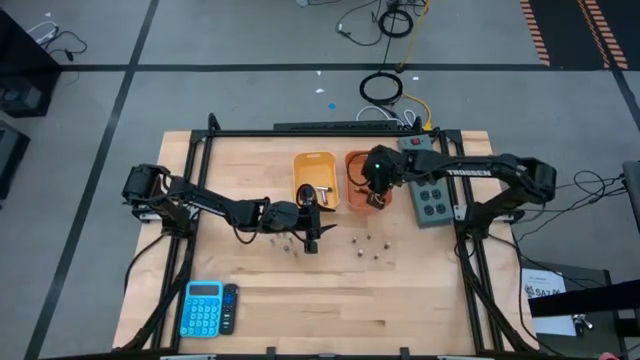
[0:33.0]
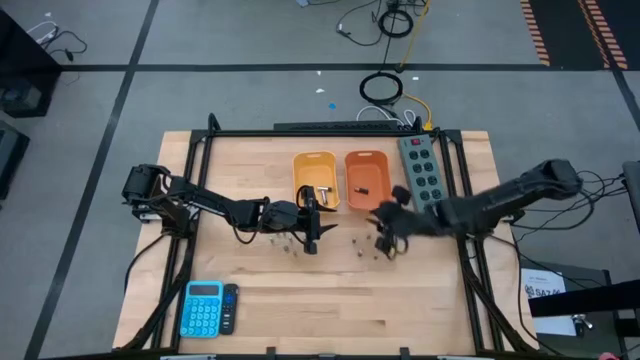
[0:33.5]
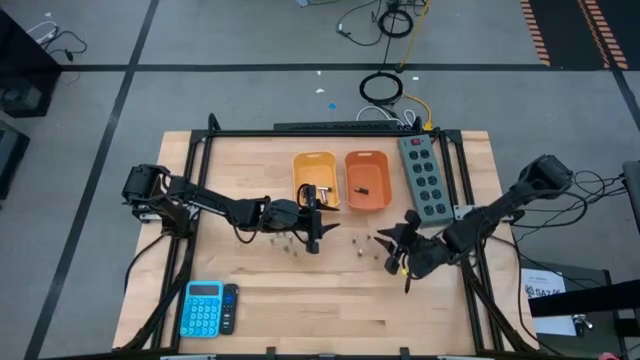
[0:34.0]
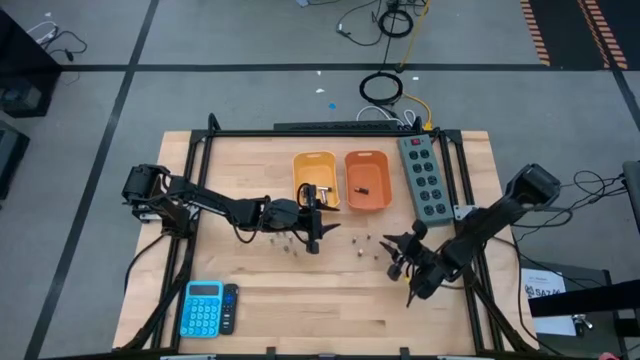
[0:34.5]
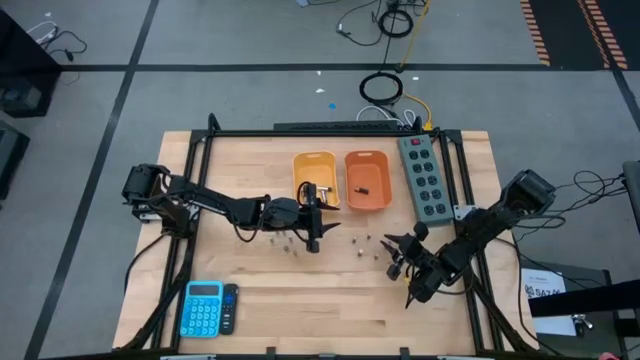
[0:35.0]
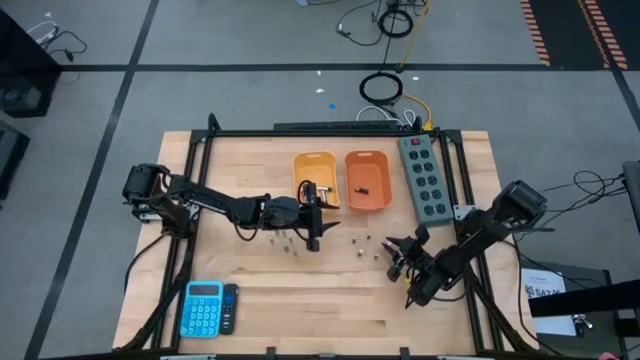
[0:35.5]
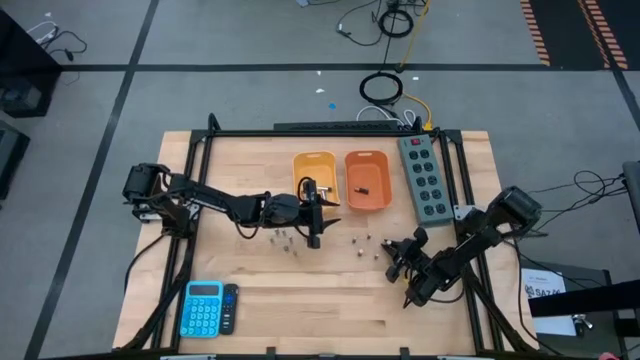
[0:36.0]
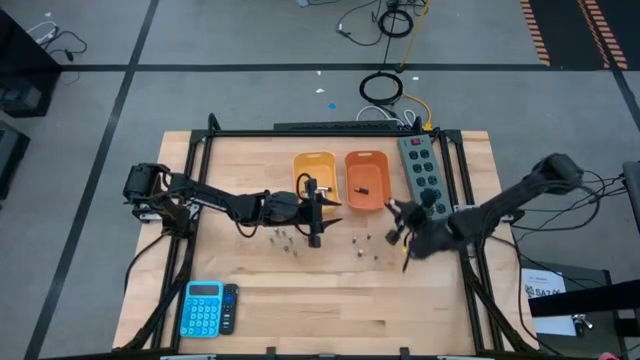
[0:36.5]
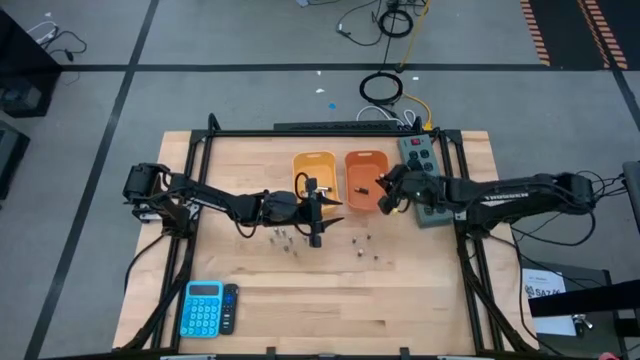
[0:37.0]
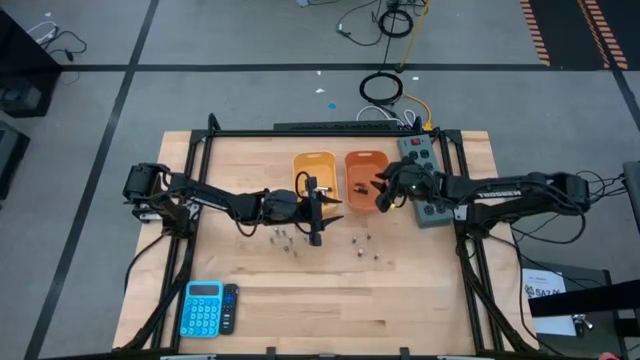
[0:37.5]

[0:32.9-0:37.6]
Task: Sort batteries
Put the copper battery into the orange bin

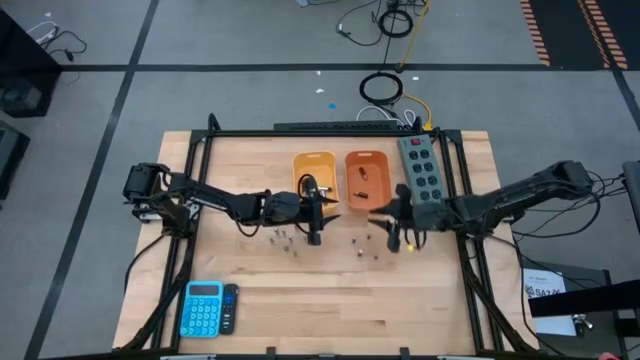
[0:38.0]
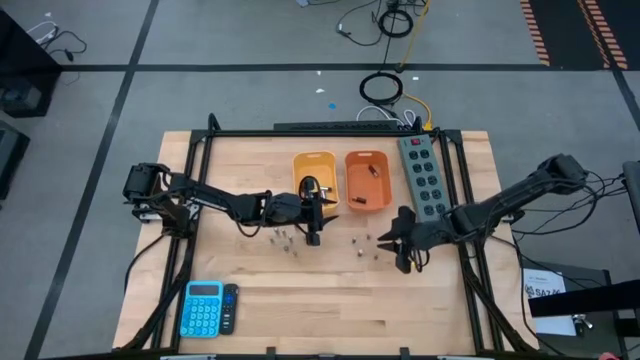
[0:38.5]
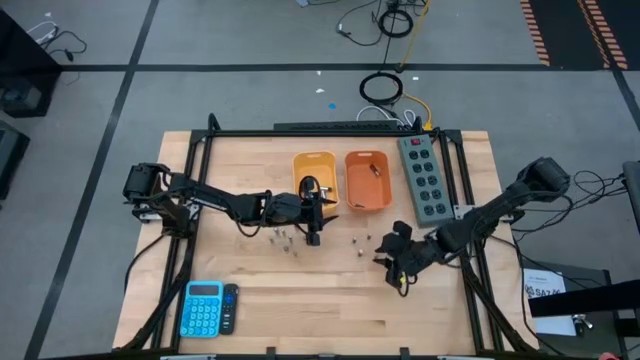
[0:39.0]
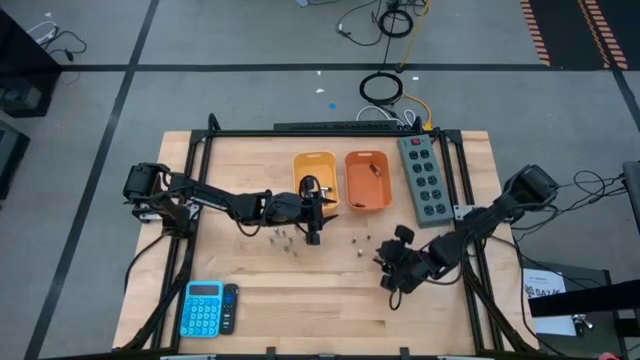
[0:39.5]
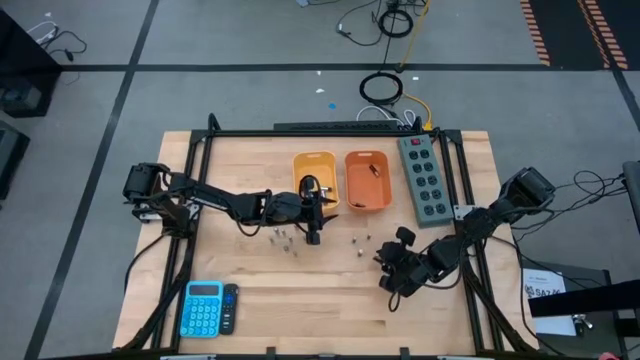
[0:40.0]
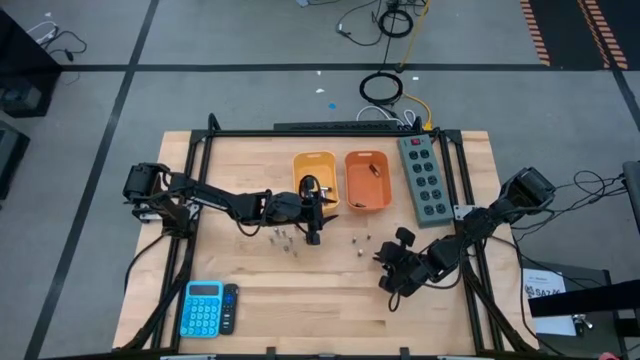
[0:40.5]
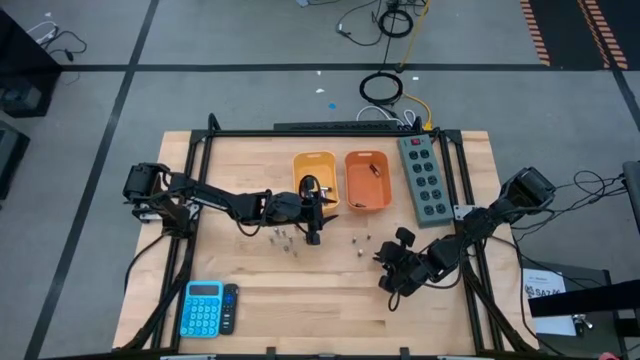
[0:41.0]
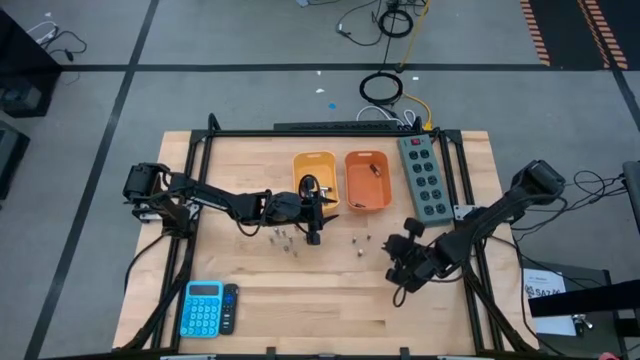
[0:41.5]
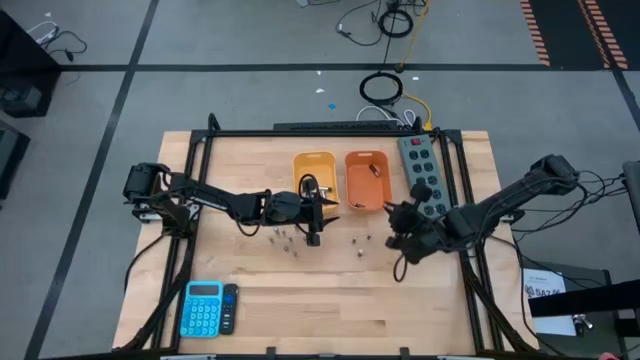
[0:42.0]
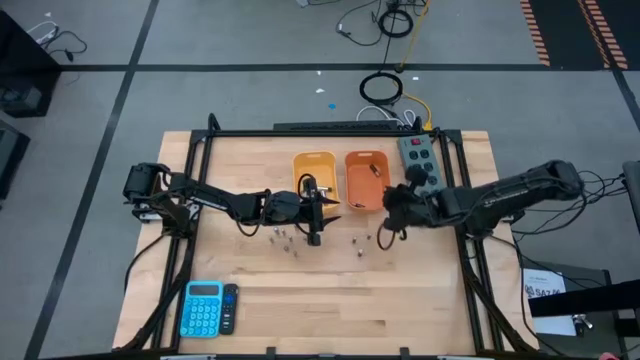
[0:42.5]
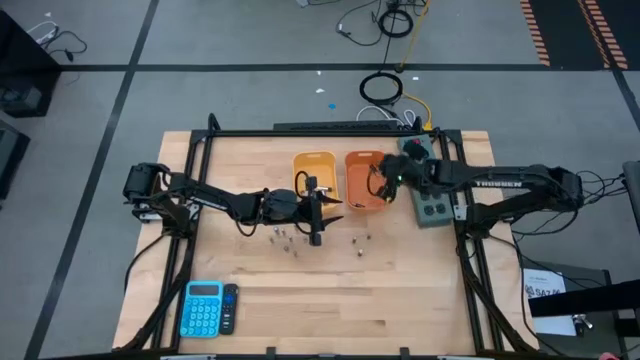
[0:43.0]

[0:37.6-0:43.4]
Put the copper battery into the orange bin

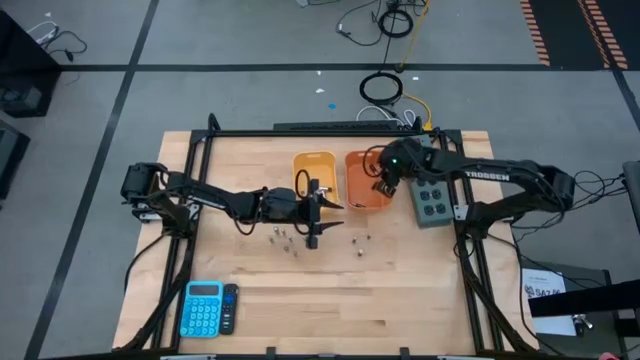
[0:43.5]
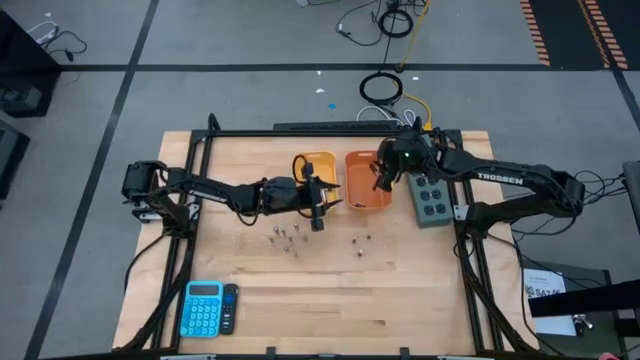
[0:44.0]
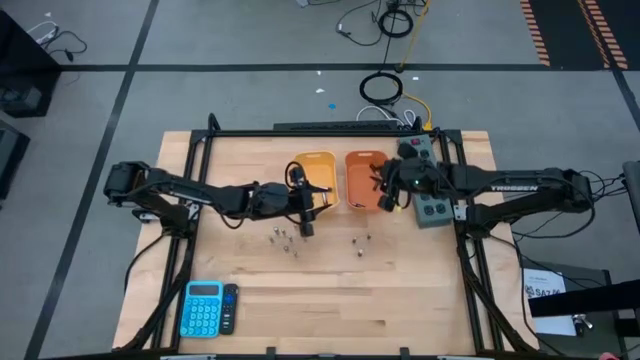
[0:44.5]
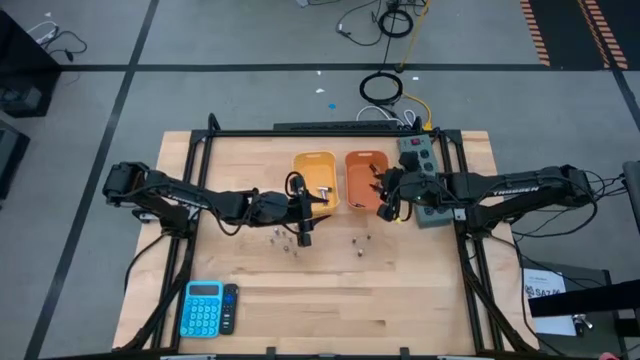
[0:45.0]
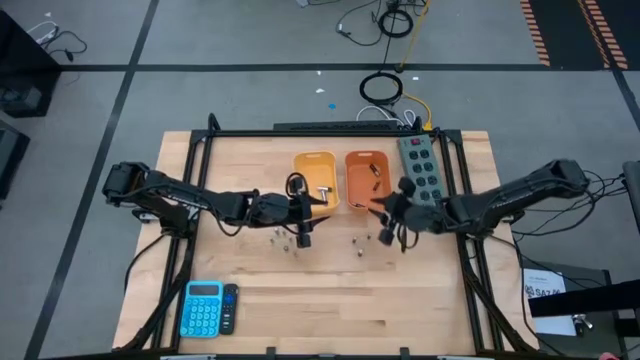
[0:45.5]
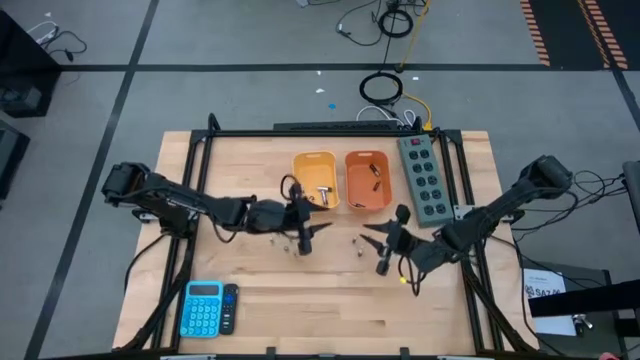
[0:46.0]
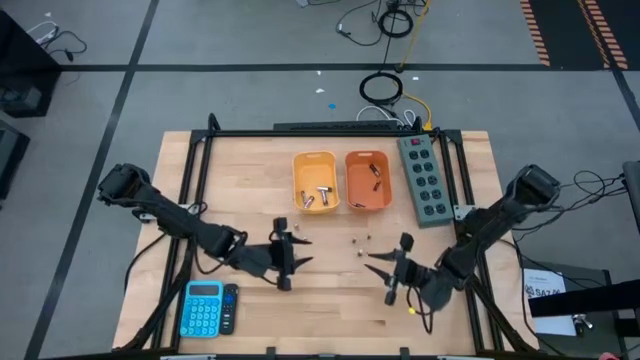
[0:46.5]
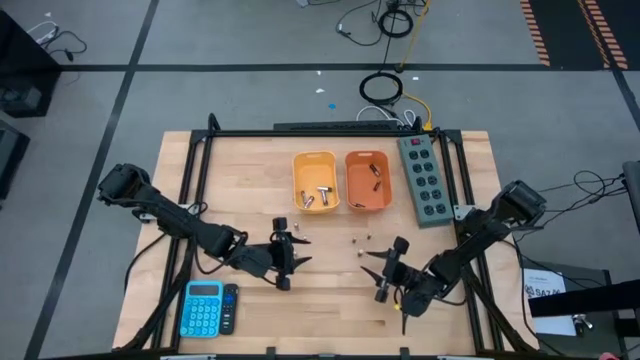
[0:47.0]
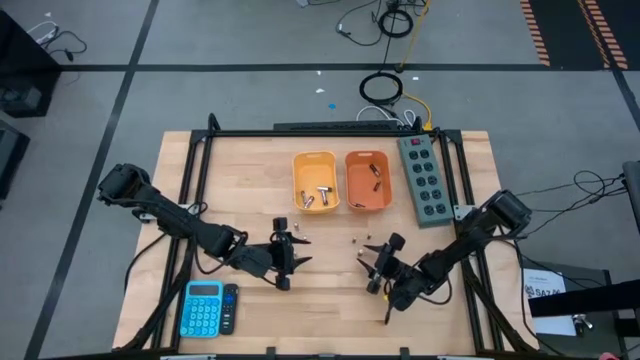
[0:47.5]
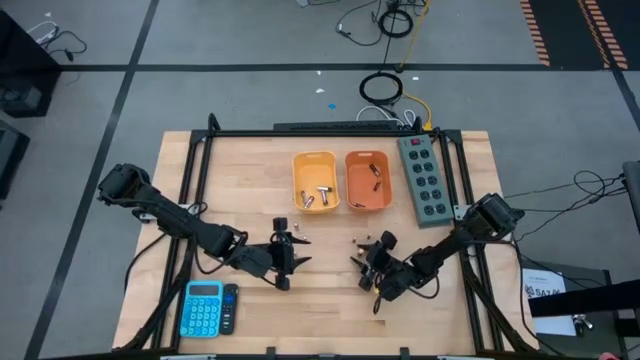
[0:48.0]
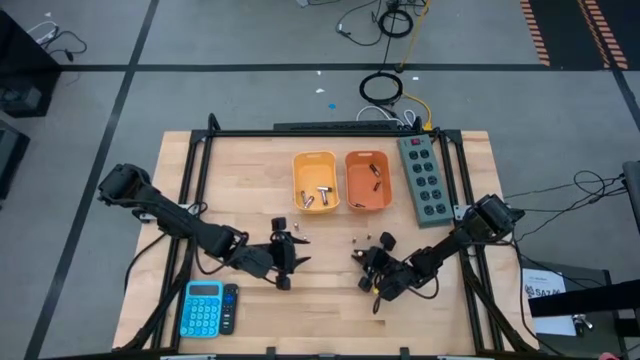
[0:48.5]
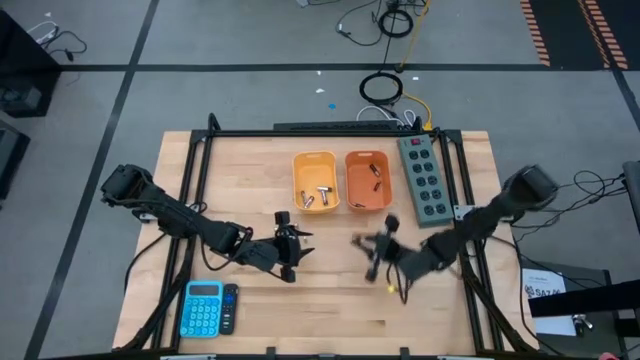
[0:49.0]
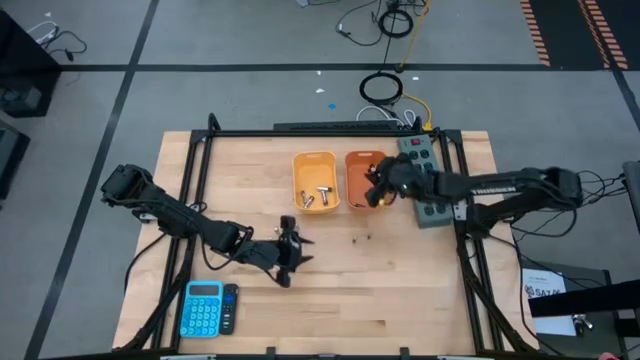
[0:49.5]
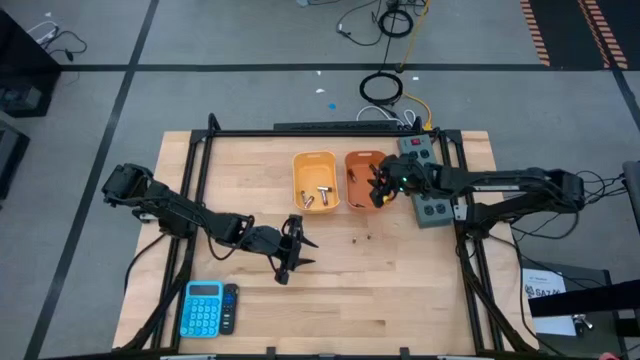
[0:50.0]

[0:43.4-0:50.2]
Put the copper battery into the orange bin

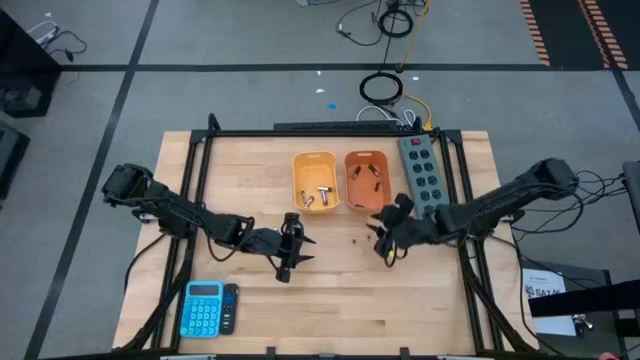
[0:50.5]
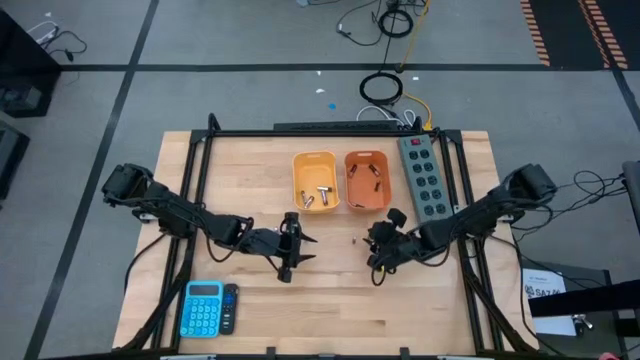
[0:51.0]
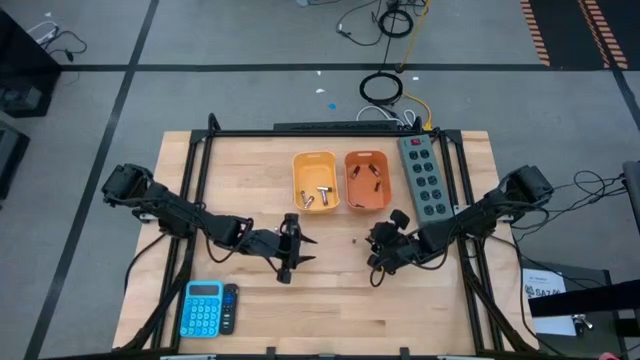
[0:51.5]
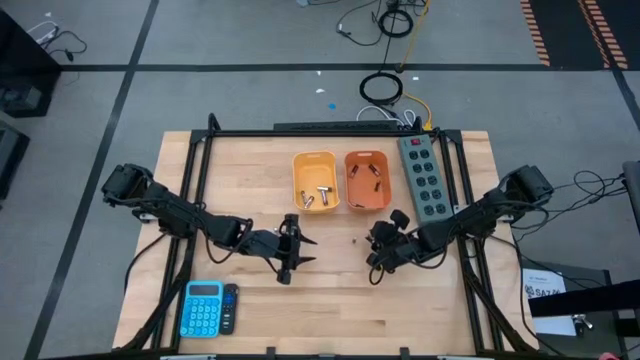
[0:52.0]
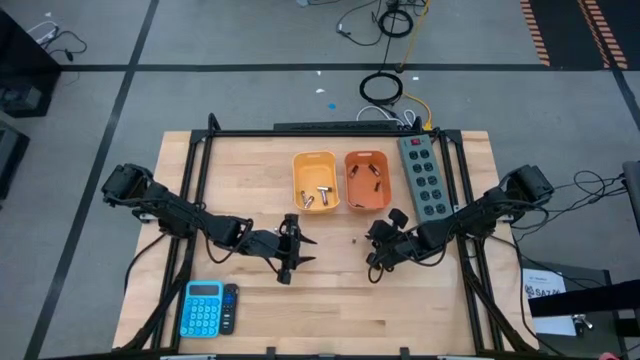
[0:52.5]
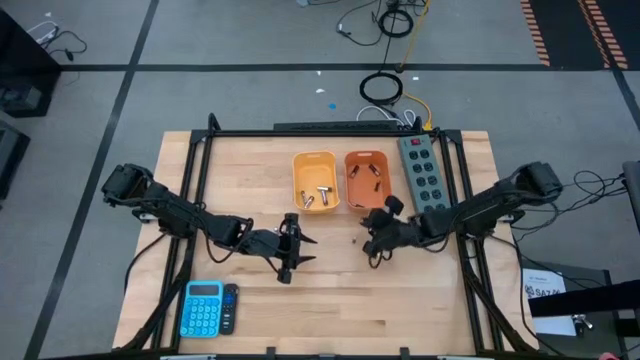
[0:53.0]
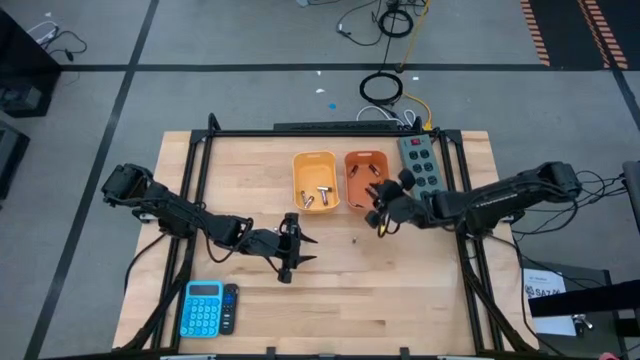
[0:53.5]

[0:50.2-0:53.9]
Put the copper battery into the orange bin

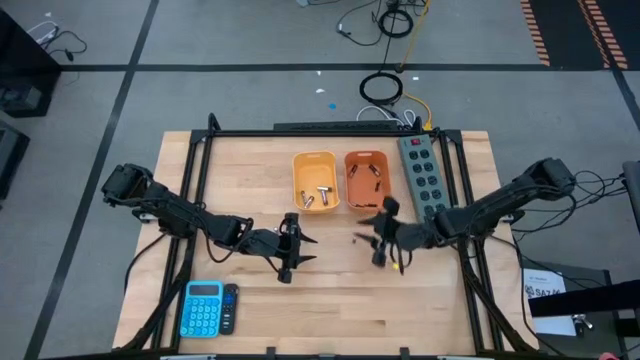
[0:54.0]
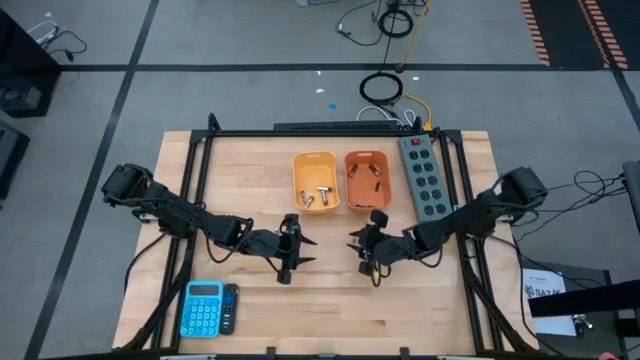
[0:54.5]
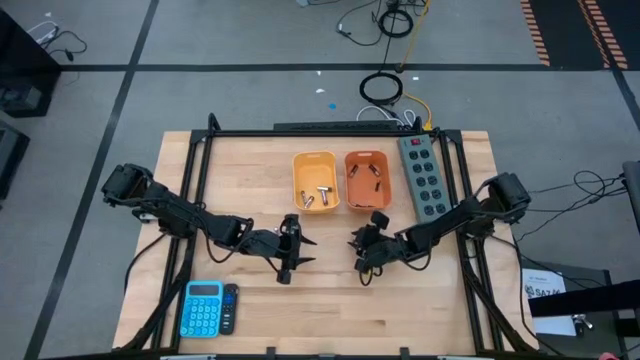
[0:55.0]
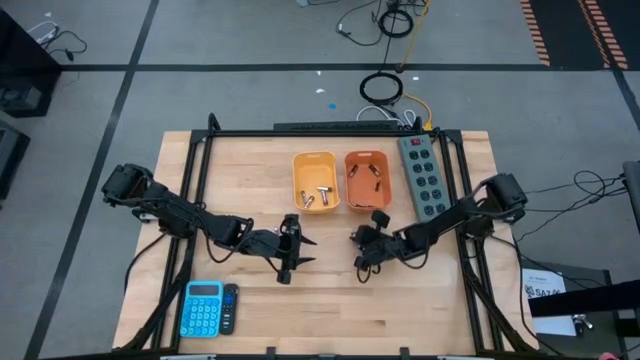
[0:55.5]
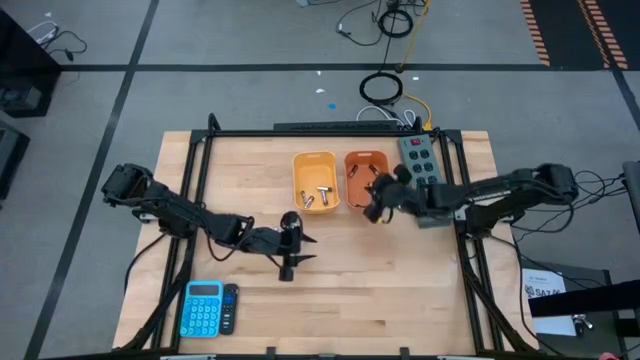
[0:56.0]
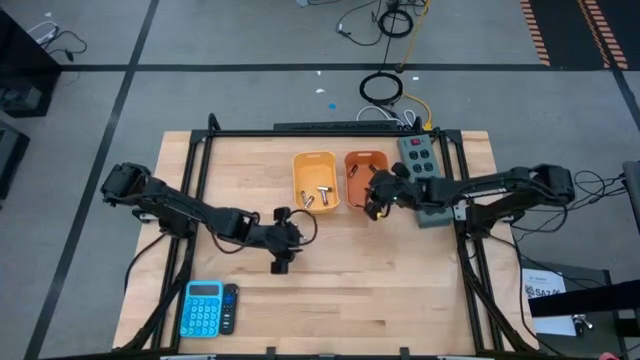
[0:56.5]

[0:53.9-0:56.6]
Put the copper battery into the orange bin
